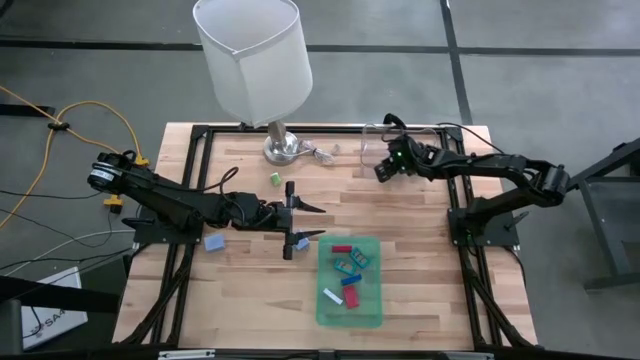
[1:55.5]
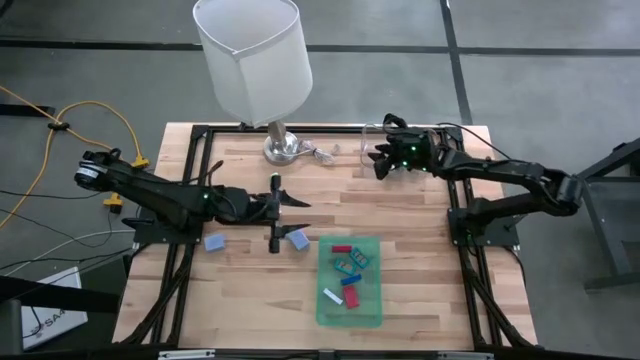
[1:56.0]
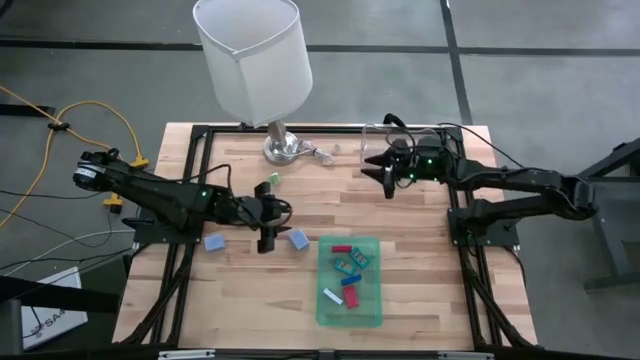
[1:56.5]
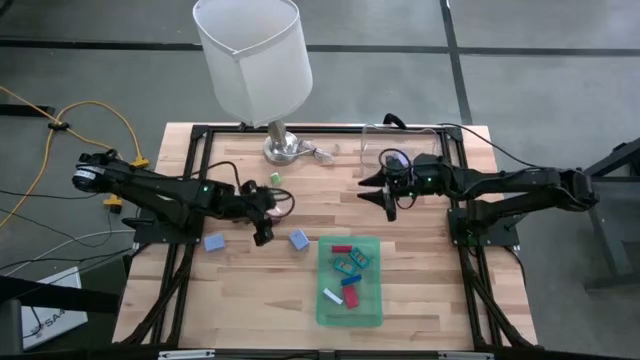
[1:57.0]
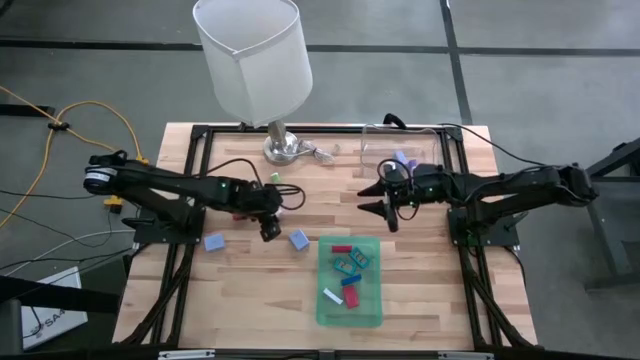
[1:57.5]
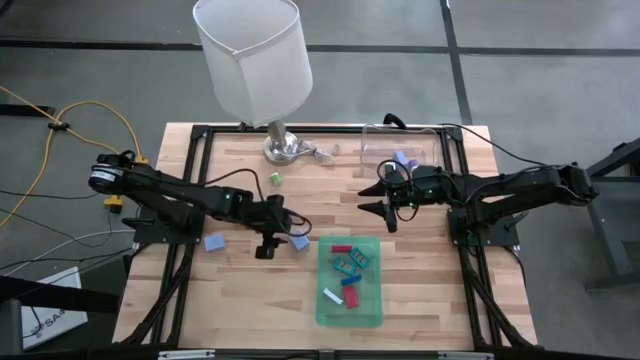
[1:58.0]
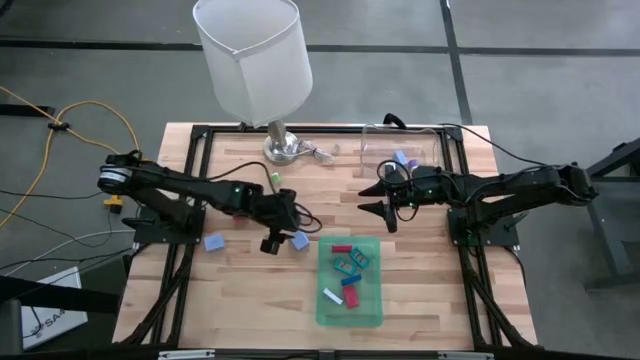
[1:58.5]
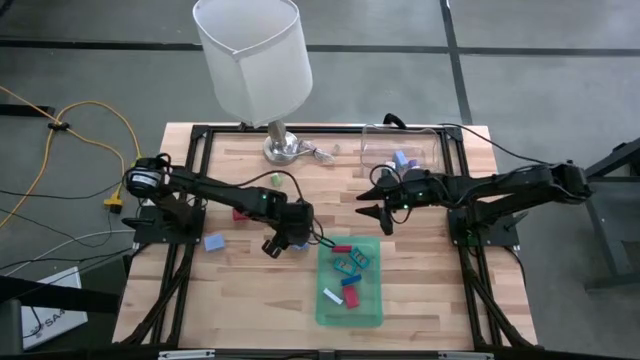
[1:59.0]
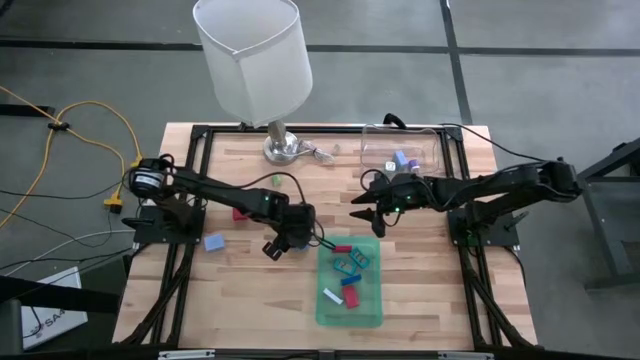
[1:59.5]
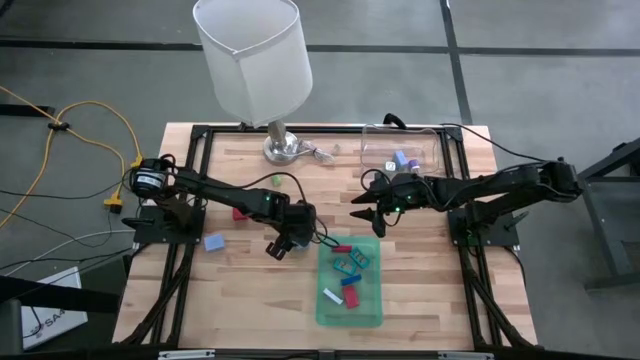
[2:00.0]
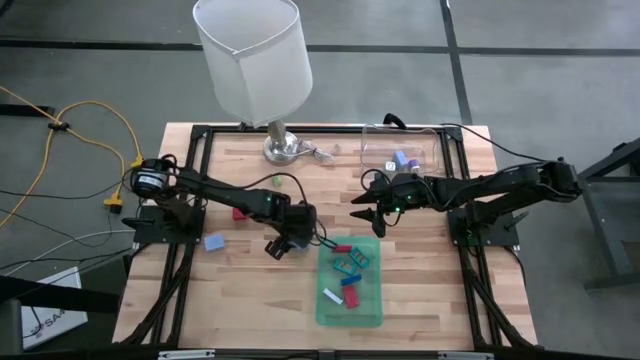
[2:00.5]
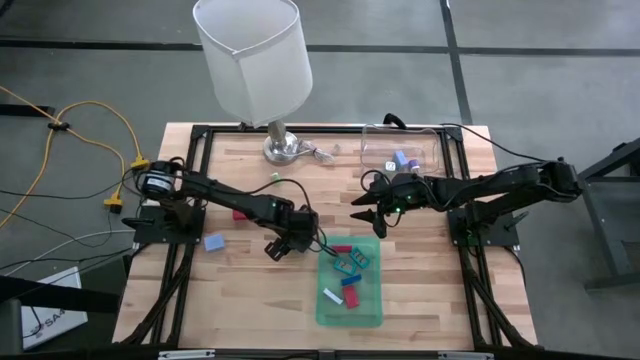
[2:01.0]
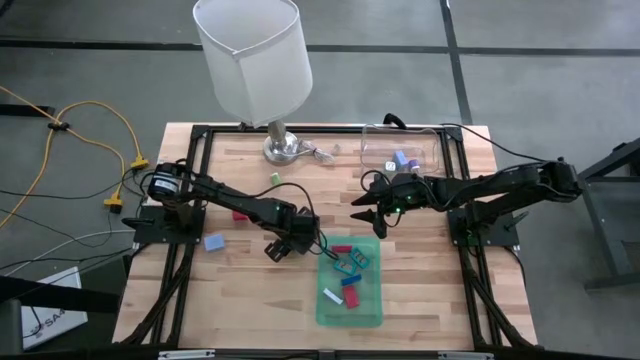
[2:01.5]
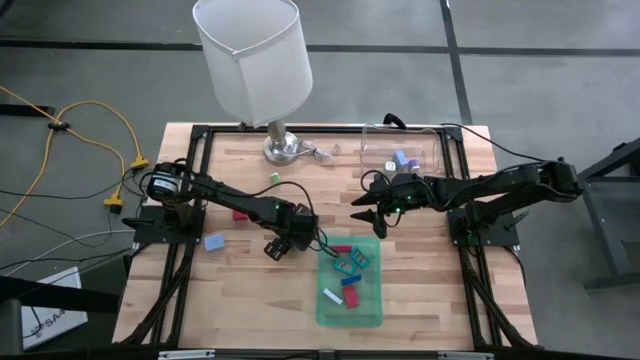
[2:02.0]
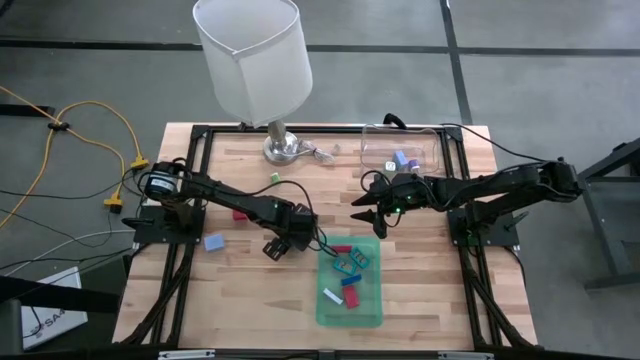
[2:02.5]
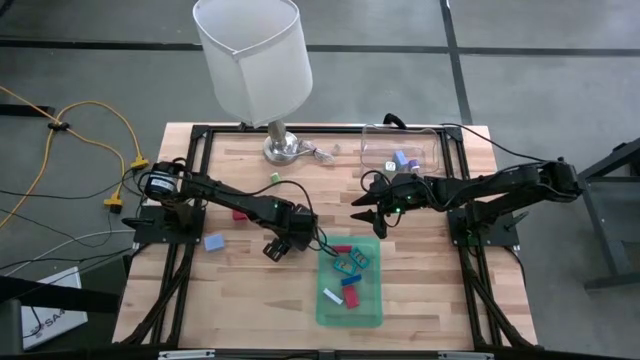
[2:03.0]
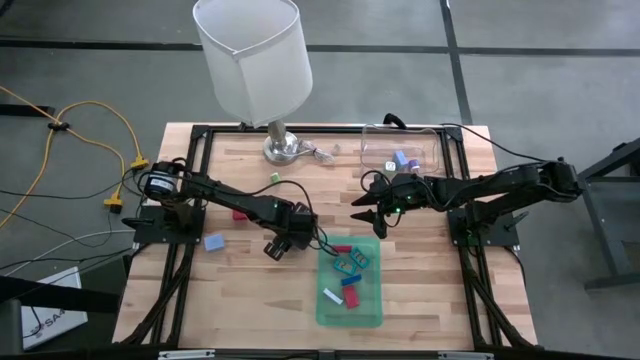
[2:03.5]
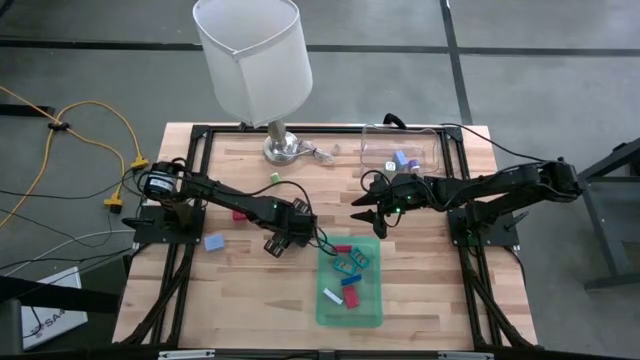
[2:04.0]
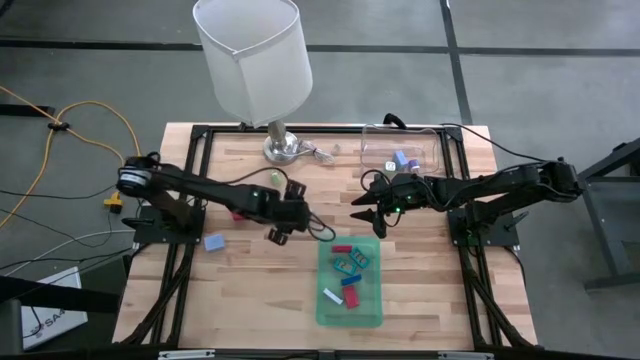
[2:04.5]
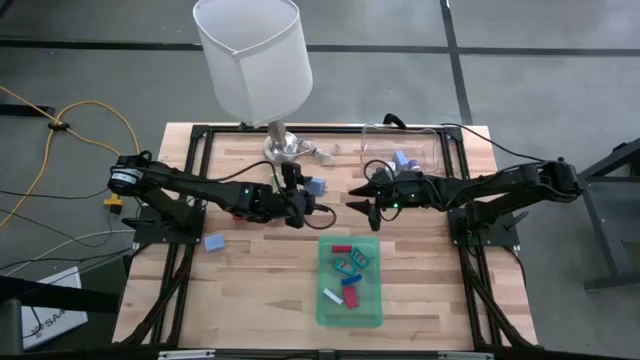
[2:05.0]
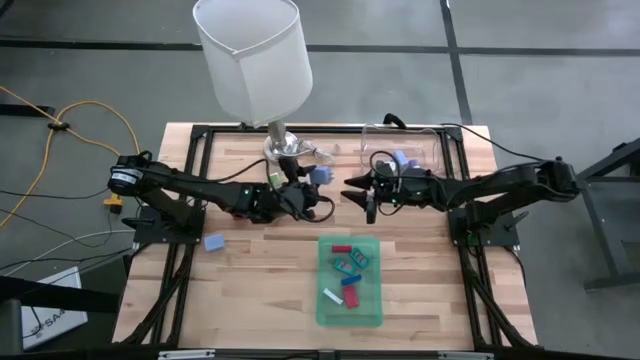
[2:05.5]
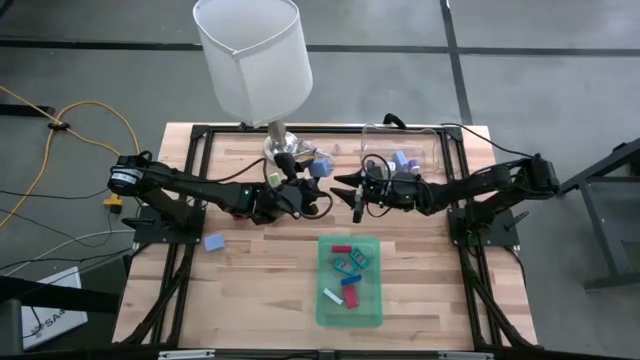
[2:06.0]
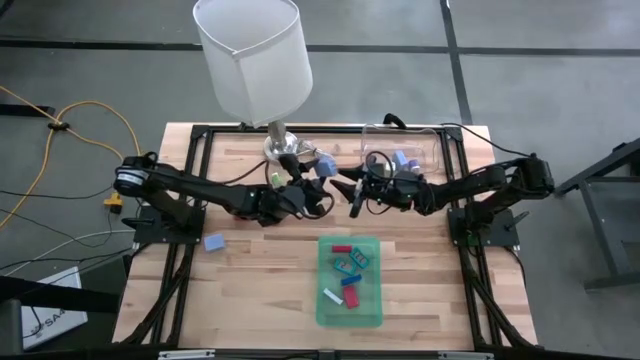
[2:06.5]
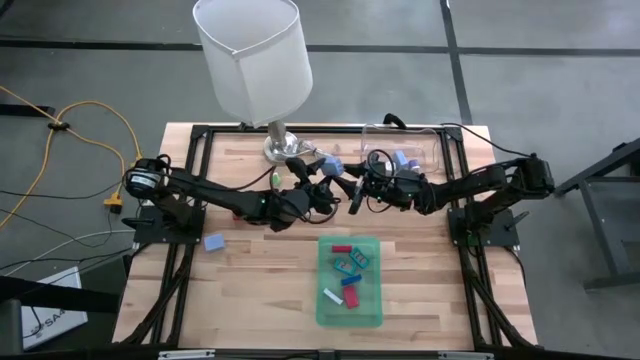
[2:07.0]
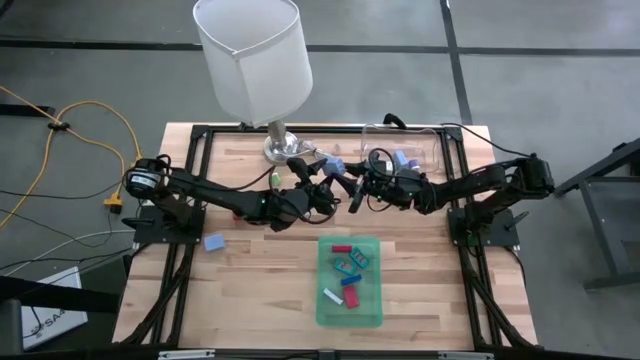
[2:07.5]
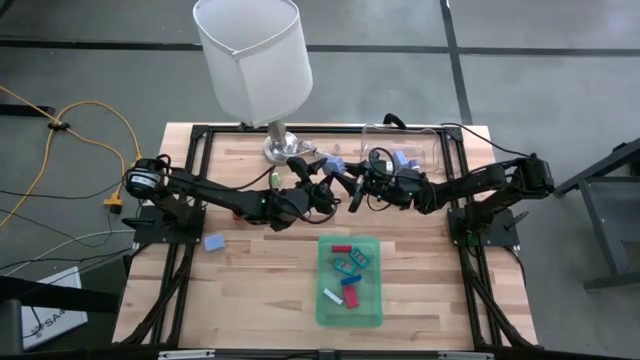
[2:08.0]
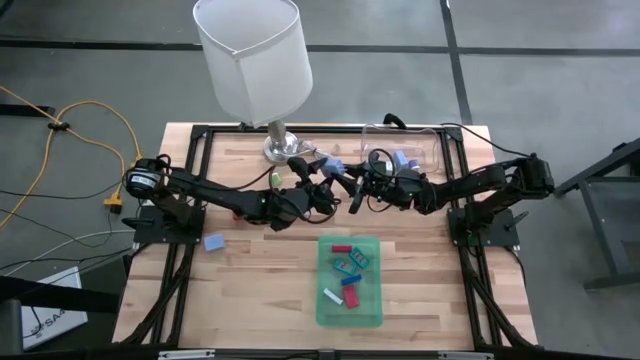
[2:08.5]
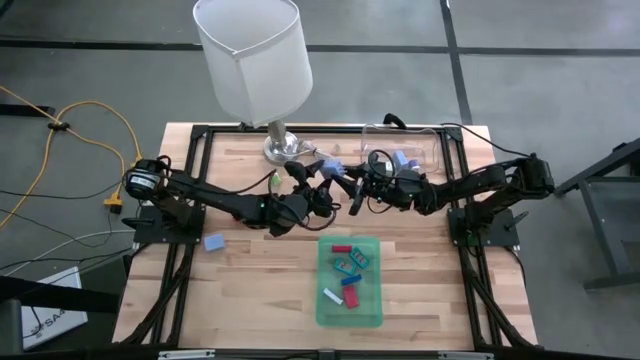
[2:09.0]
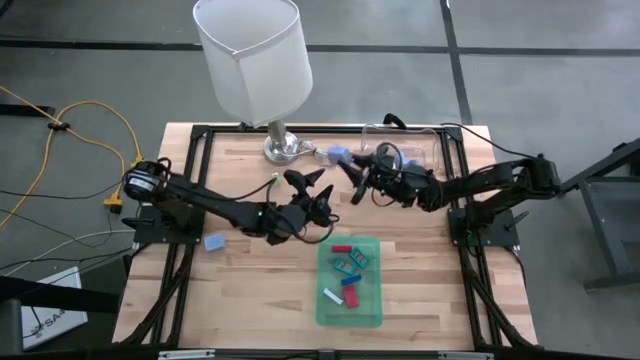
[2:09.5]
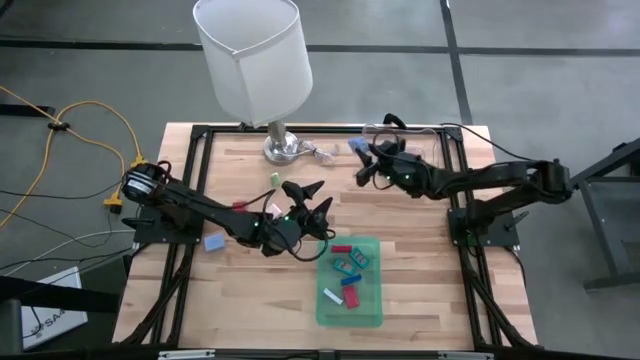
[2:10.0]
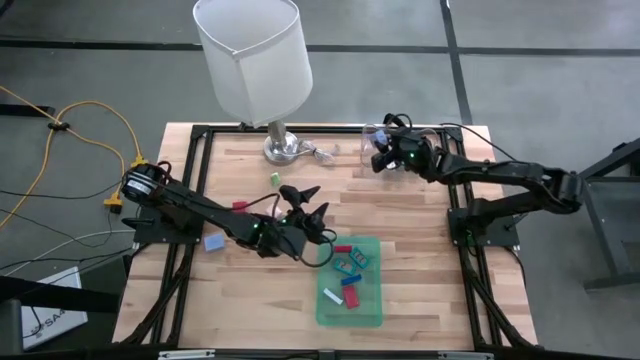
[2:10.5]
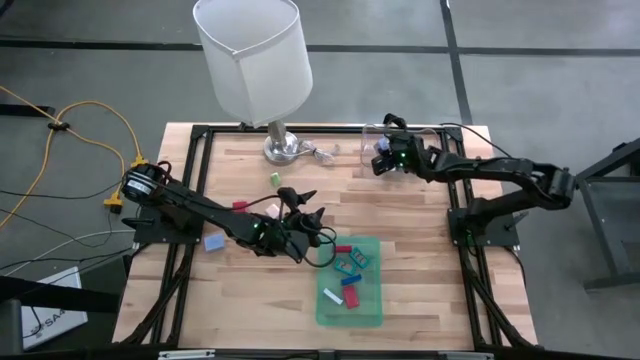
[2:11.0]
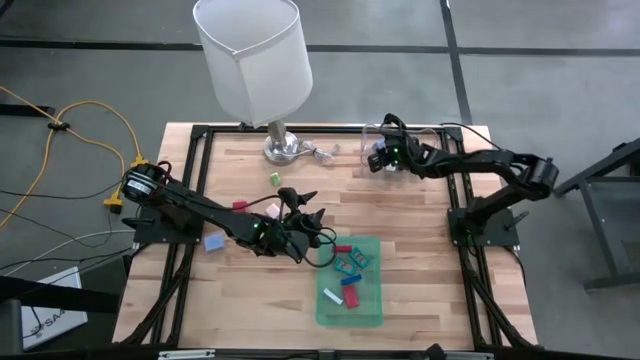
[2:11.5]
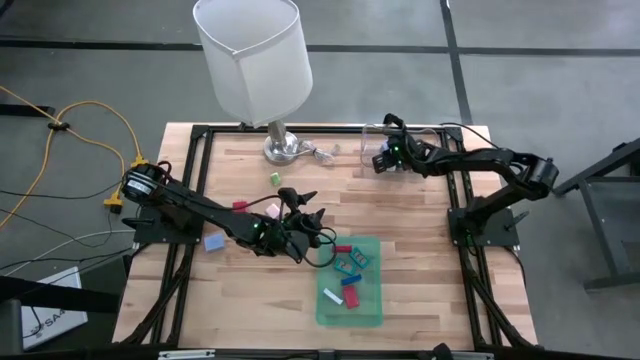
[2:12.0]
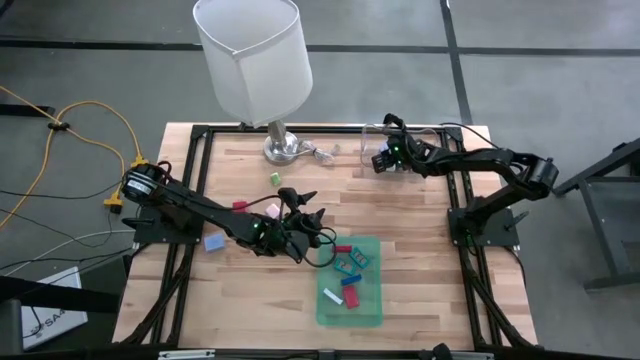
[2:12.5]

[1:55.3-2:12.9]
Task: Pick & Place Office items
Put the right purple charger adapter into the transparent bin

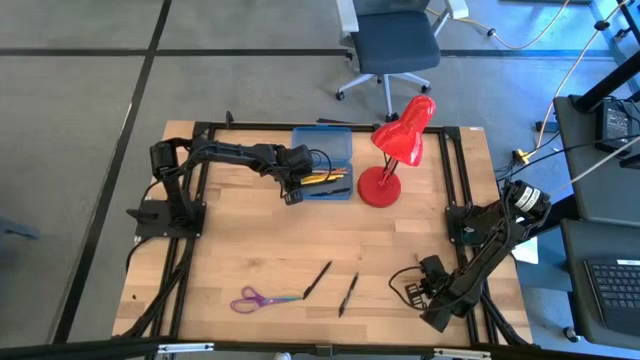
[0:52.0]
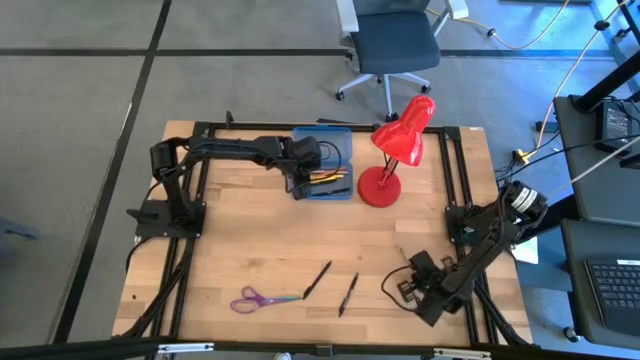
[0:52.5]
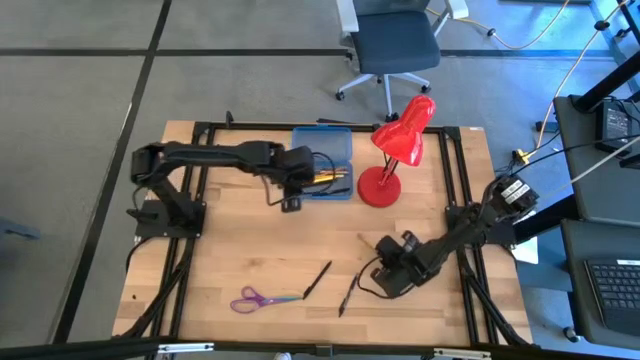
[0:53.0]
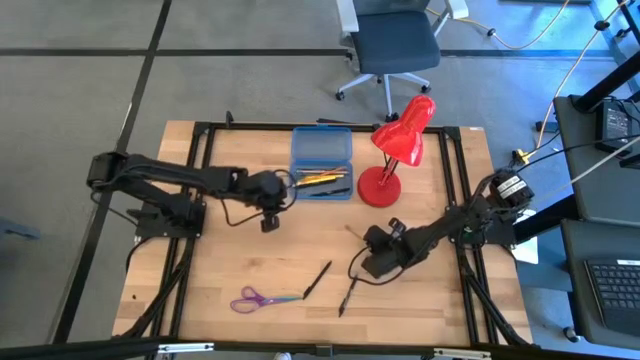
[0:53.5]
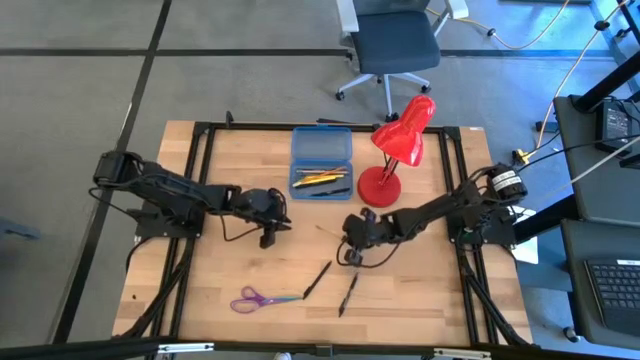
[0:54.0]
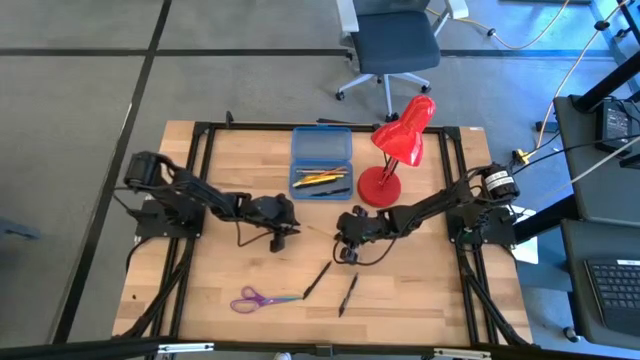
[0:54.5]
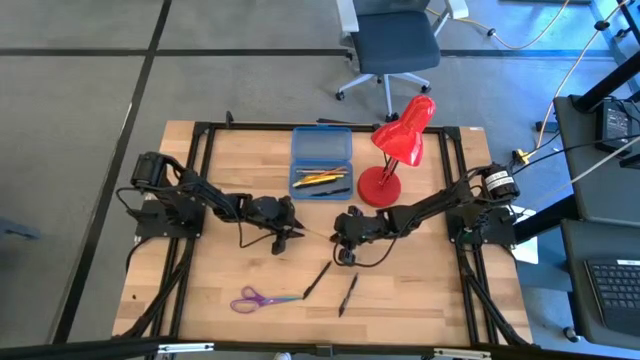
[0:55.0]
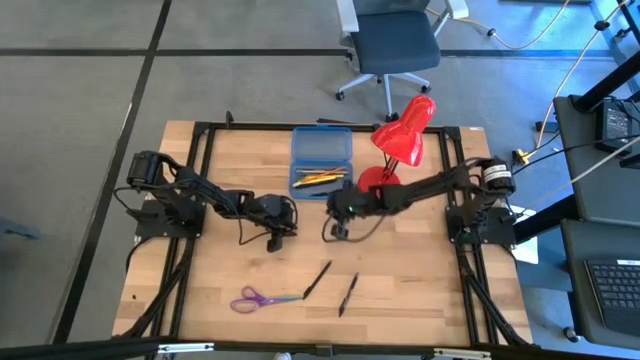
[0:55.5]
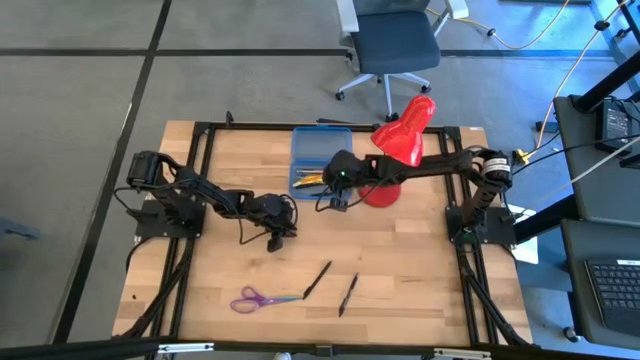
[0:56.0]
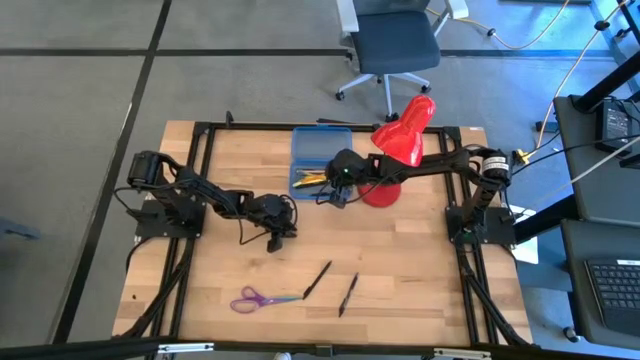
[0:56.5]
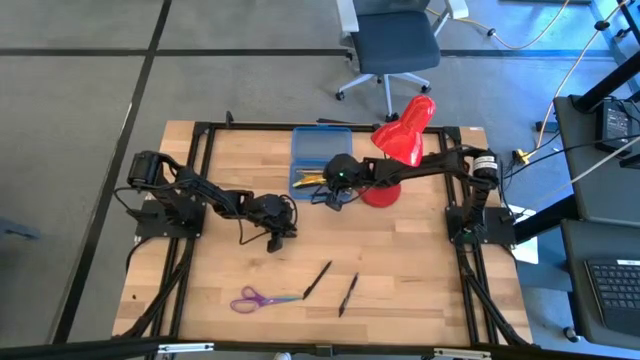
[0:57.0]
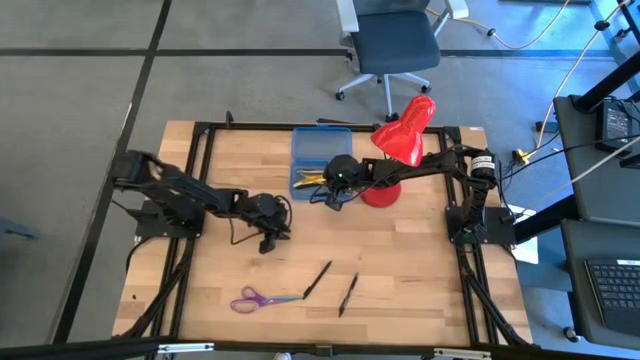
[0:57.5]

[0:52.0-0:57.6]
Task: Pick & place school supplies into a supply box
Put the yellow pencil into the blue supply box
